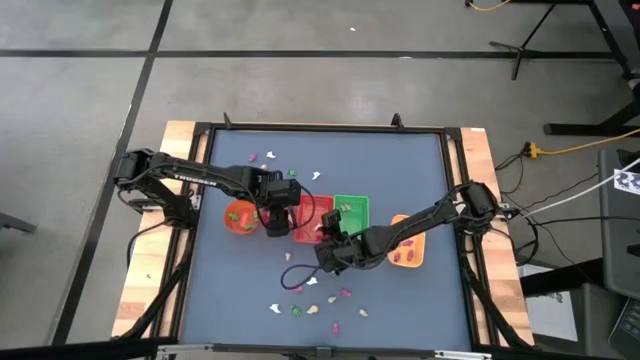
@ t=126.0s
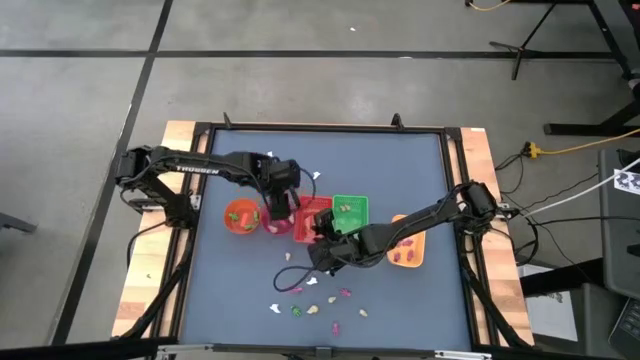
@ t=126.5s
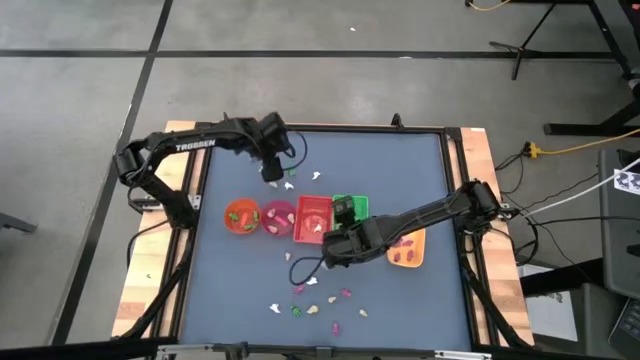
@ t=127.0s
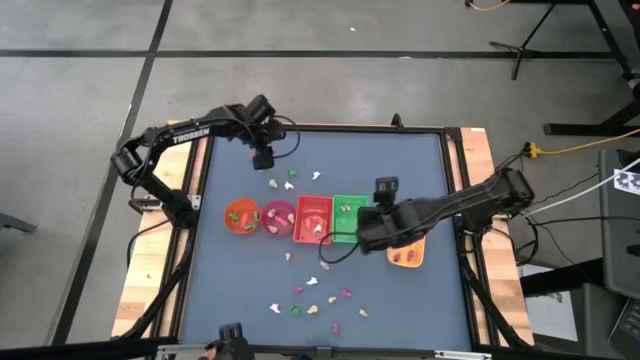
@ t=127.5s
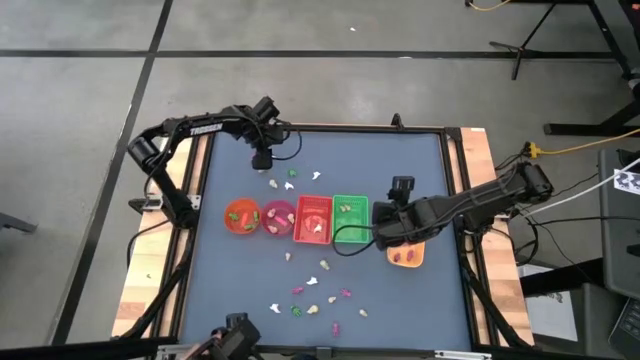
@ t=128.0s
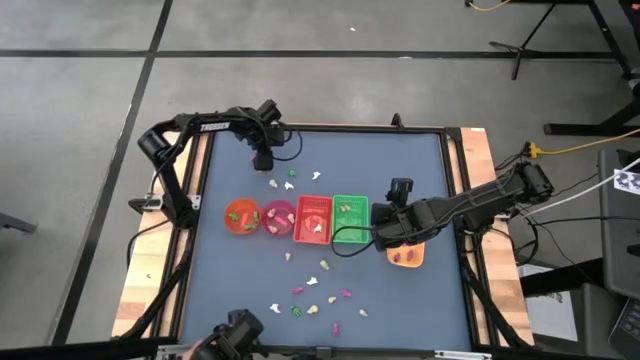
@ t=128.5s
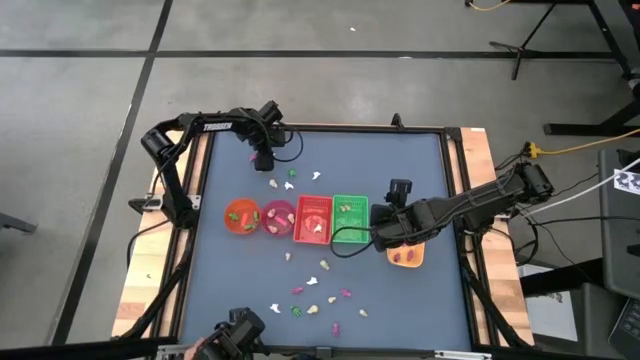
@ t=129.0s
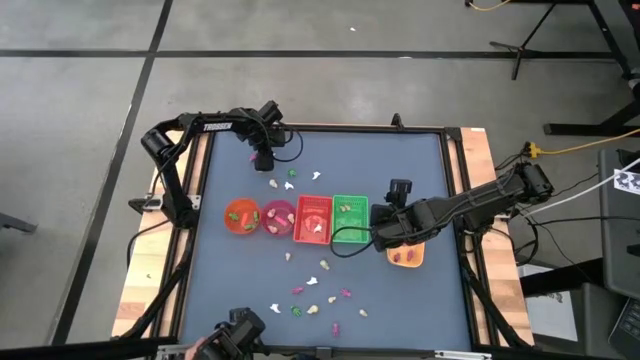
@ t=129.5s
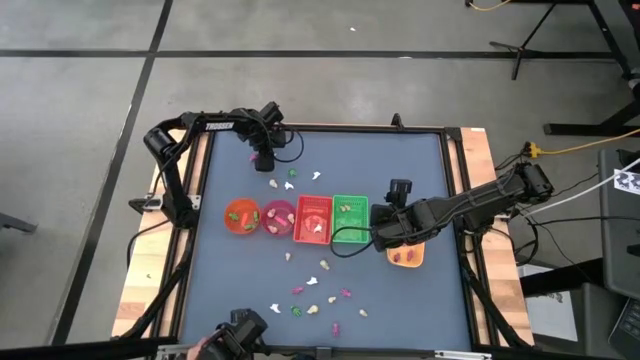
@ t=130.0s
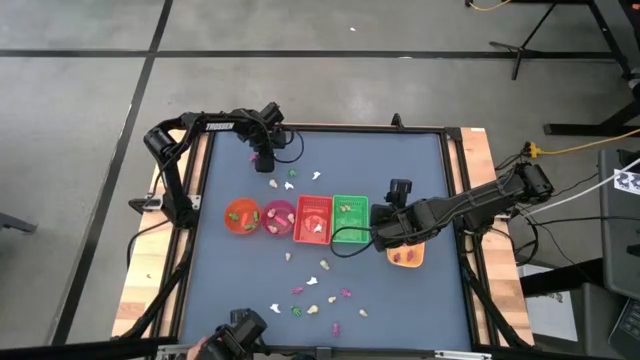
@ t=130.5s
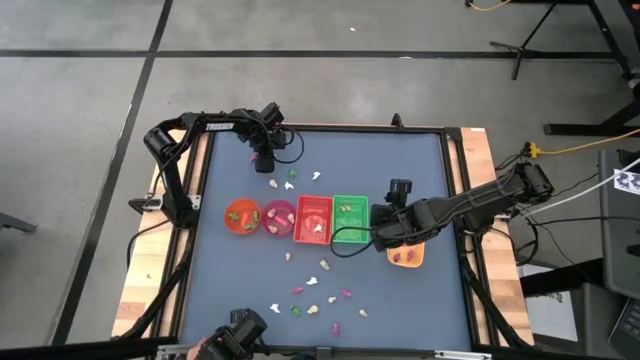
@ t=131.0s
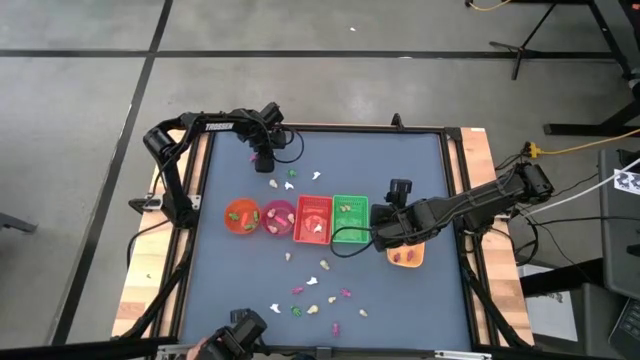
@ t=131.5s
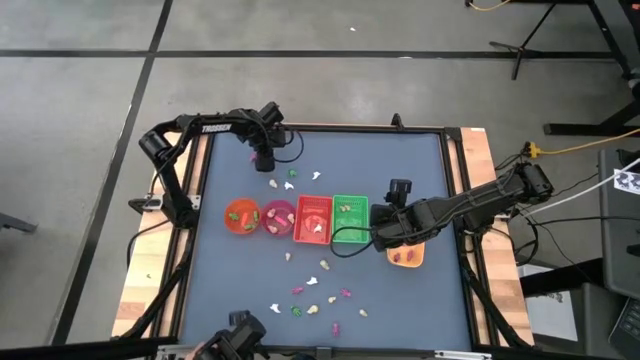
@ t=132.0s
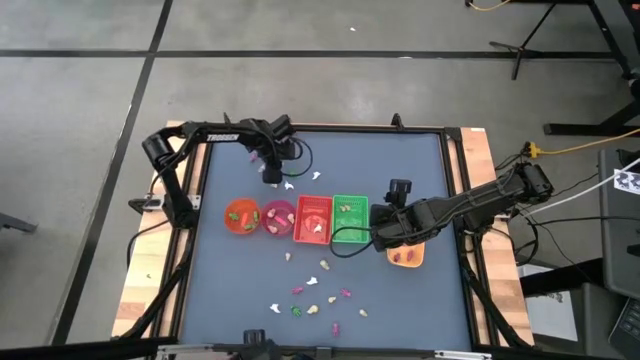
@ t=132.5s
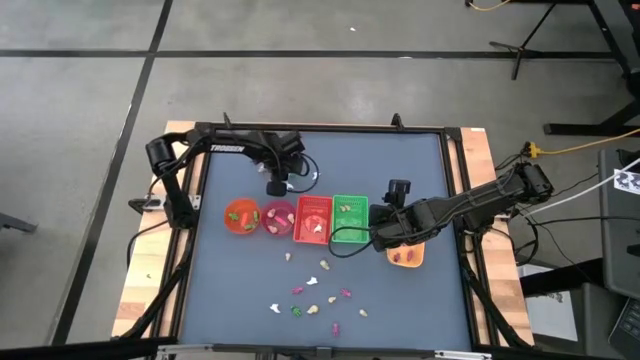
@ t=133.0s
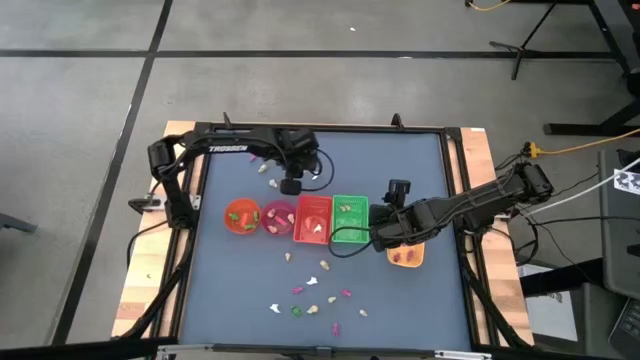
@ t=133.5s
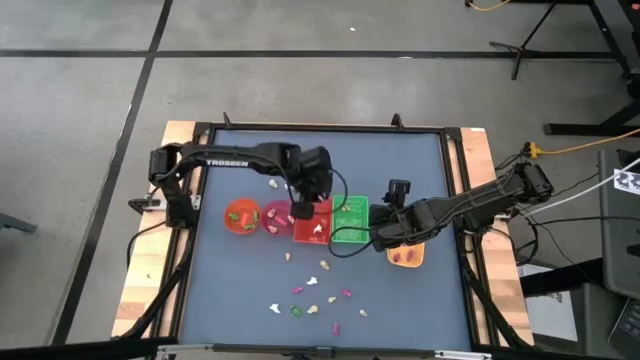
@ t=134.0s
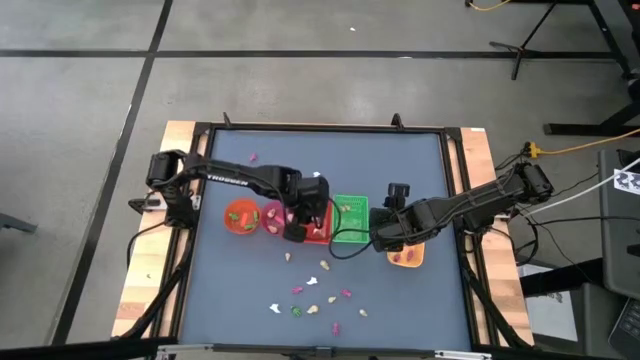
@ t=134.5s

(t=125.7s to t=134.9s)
Task: Sort Halloween decoration
Put the white ghost toy into the red bin

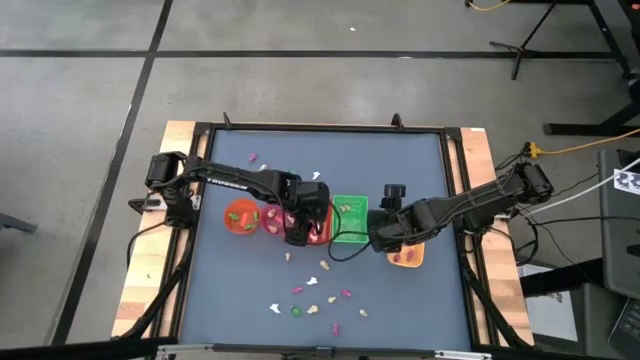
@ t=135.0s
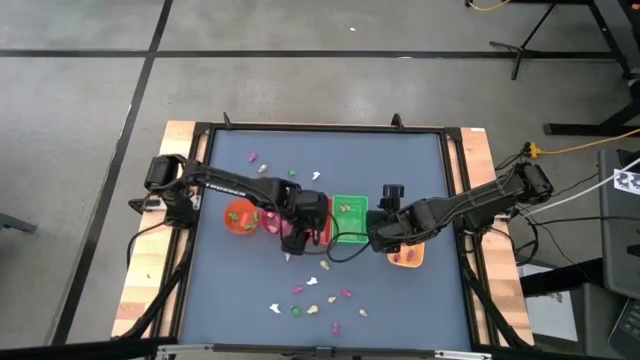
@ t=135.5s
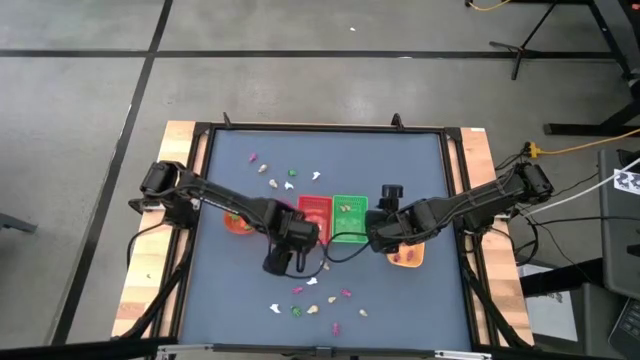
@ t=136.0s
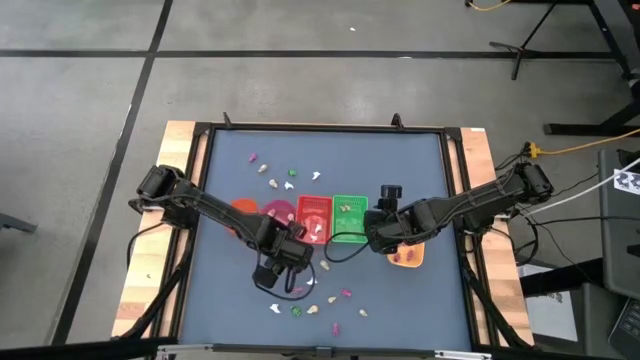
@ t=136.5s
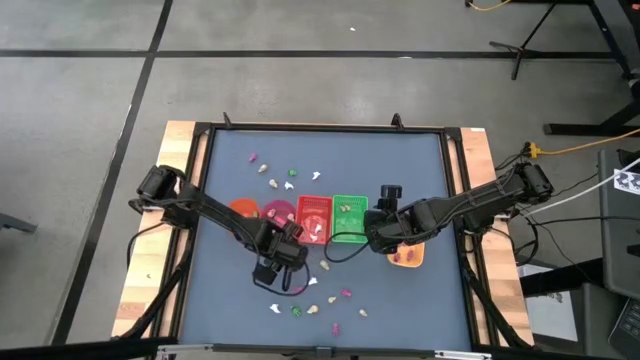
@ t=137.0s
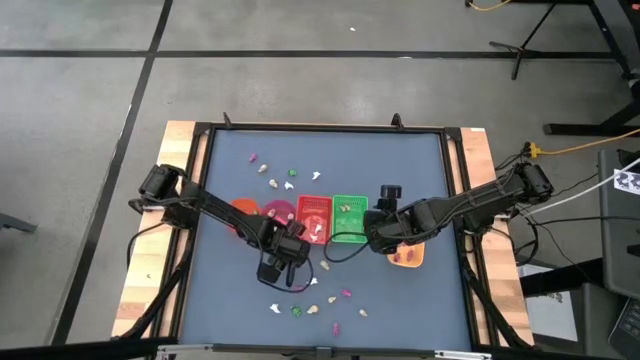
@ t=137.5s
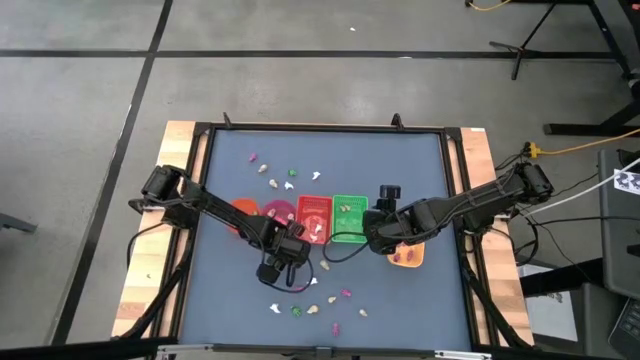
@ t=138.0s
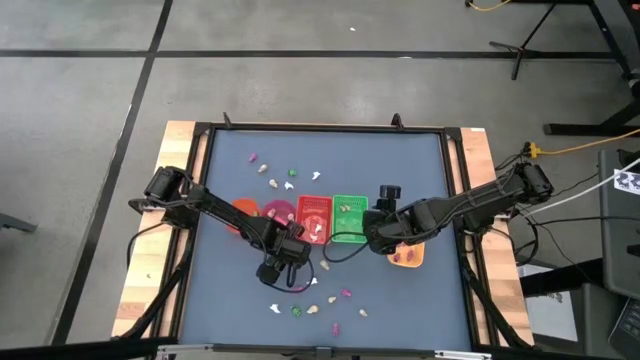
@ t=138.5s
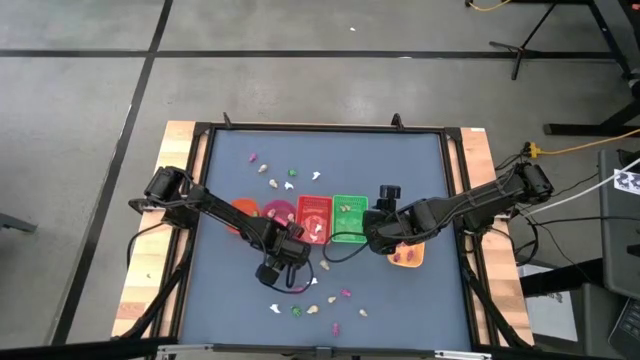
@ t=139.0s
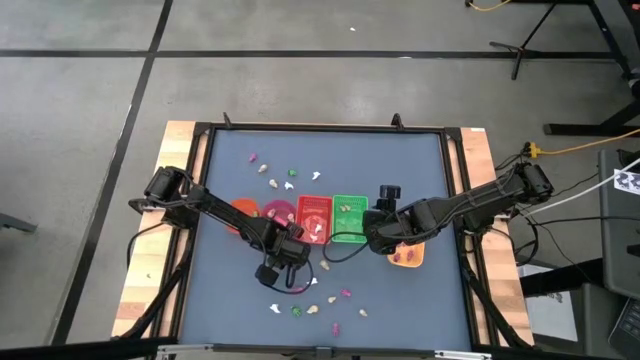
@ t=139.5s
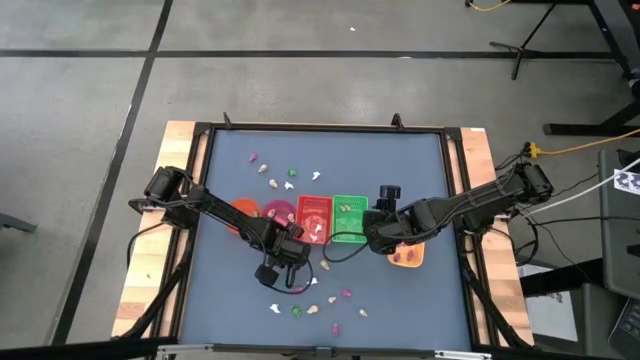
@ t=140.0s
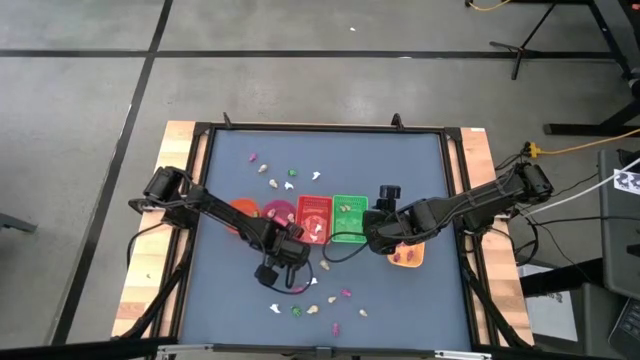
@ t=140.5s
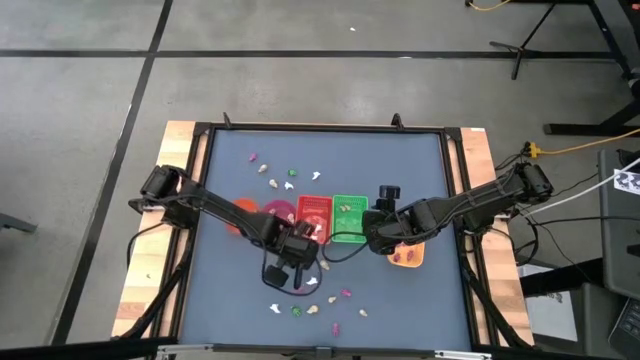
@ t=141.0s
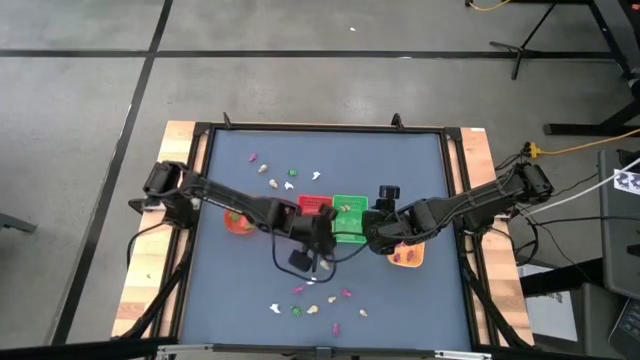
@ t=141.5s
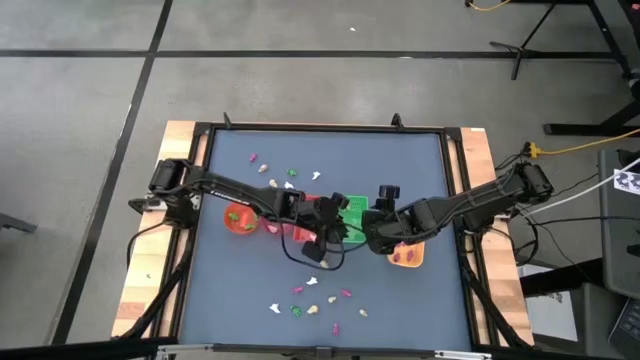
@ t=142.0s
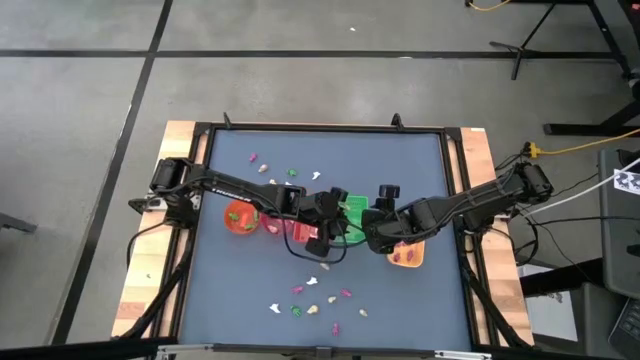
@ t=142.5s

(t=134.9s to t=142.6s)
Put the yellow skull toy into the green bin

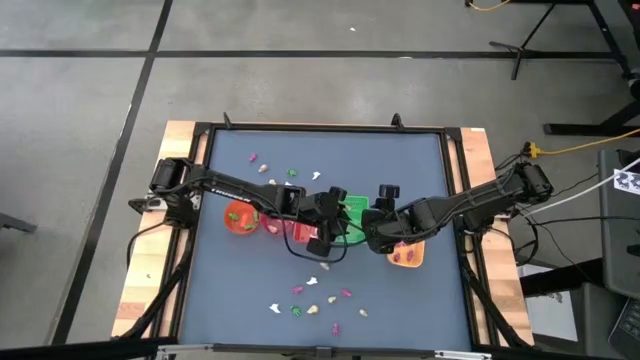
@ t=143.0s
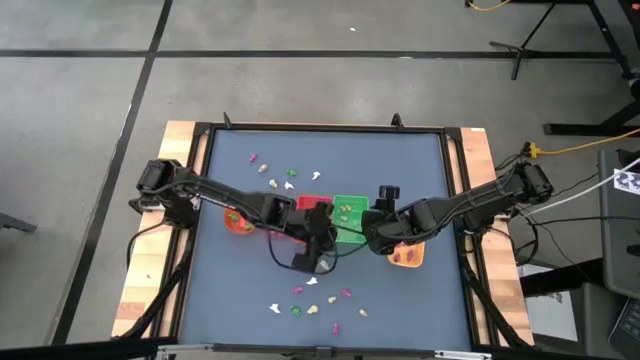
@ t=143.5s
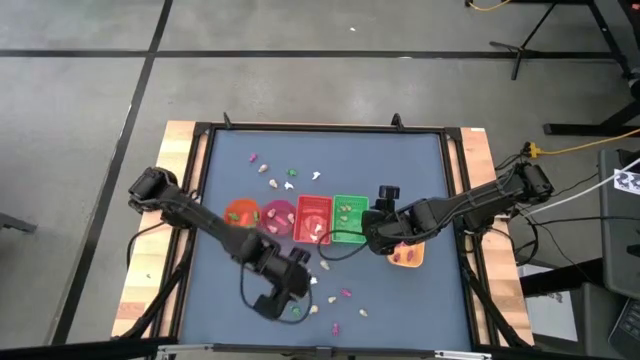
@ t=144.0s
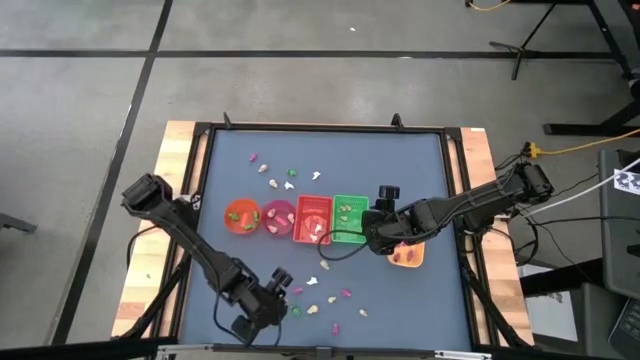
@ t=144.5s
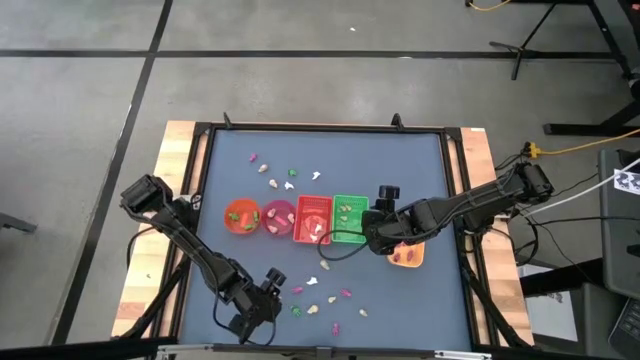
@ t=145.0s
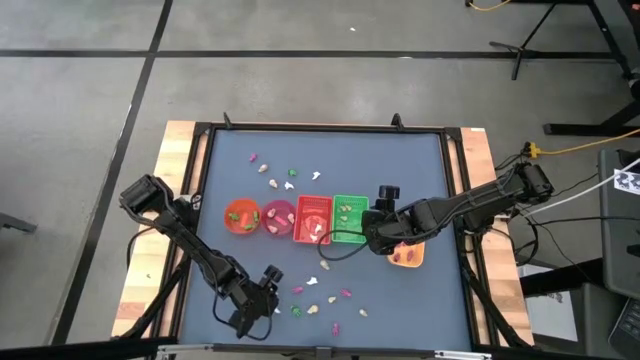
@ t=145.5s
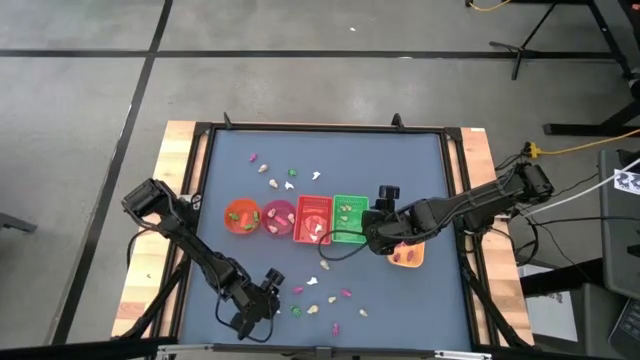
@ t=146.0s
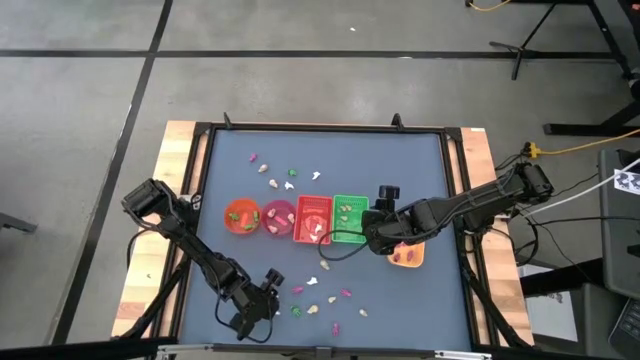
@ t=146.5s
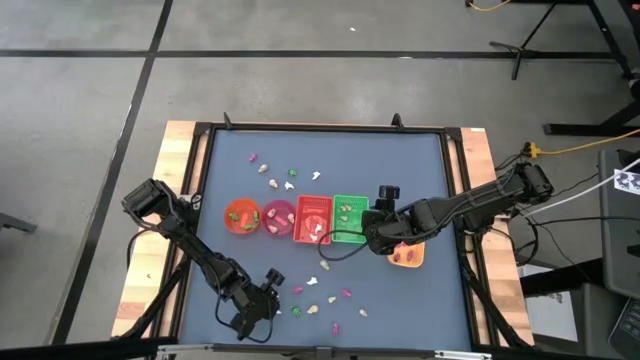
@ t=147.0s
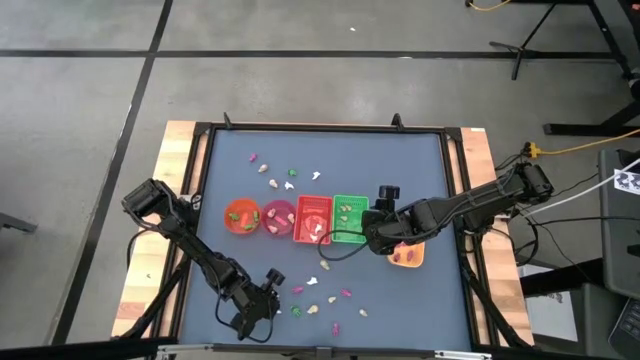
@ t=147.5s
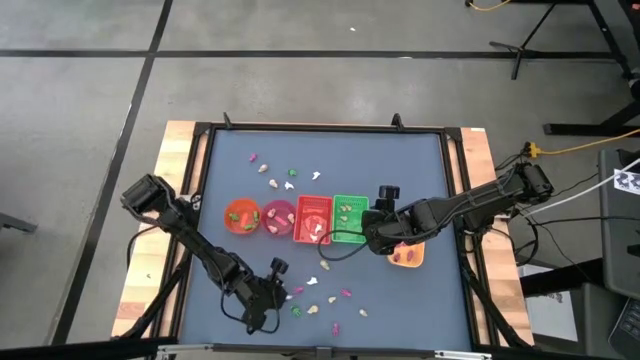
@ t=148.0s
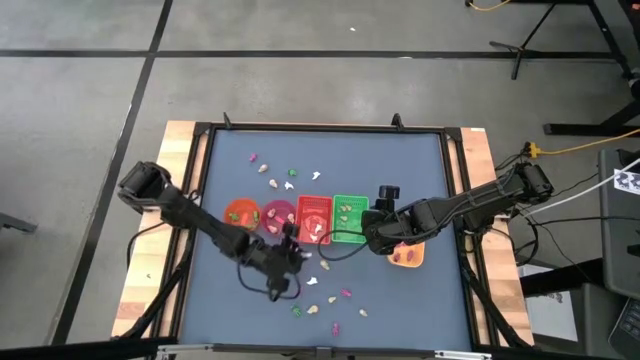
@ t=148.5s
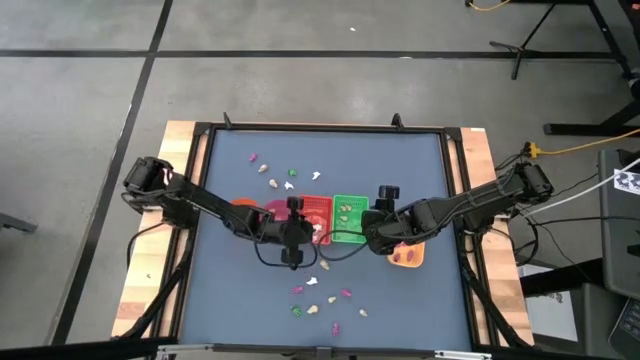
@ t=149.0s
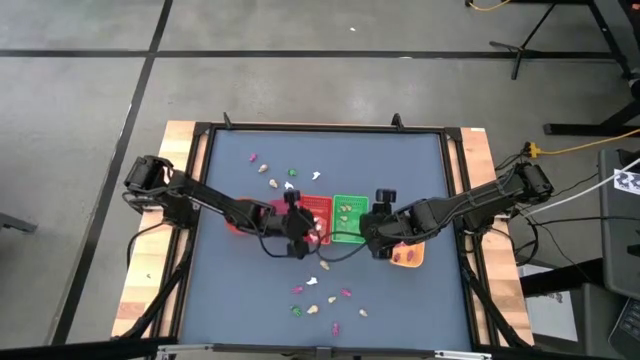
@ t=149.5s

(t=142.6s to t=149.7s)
Put the white ghost toy into the red bin
